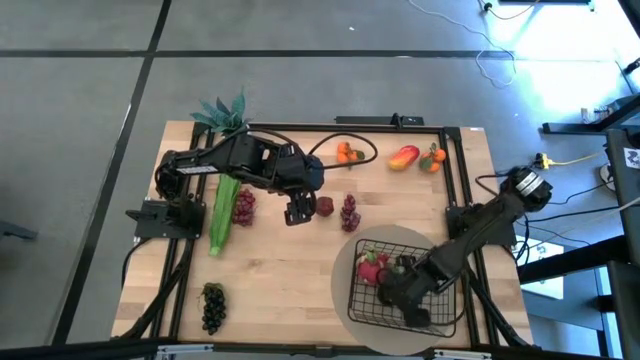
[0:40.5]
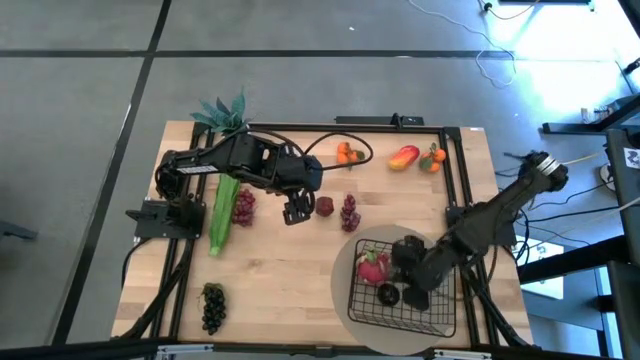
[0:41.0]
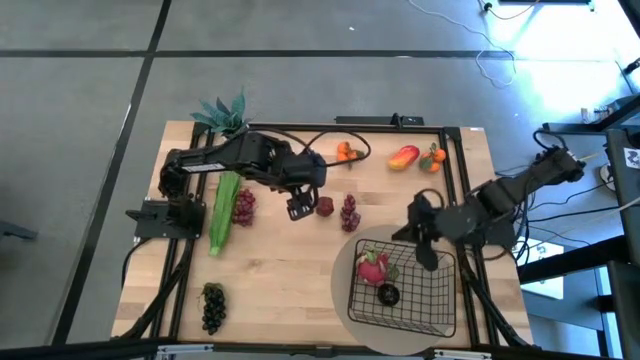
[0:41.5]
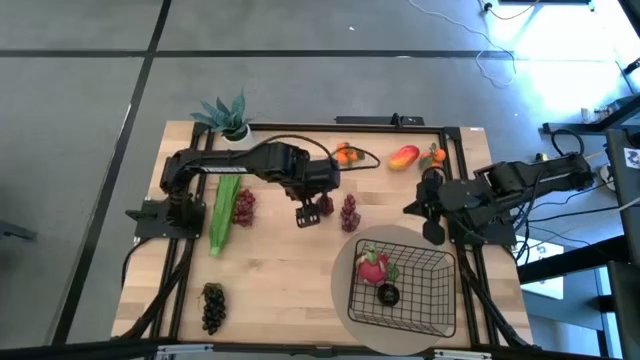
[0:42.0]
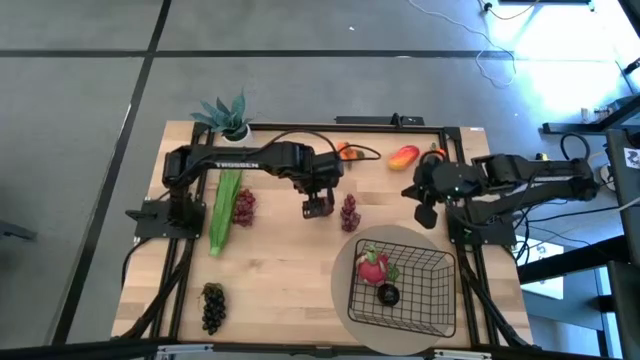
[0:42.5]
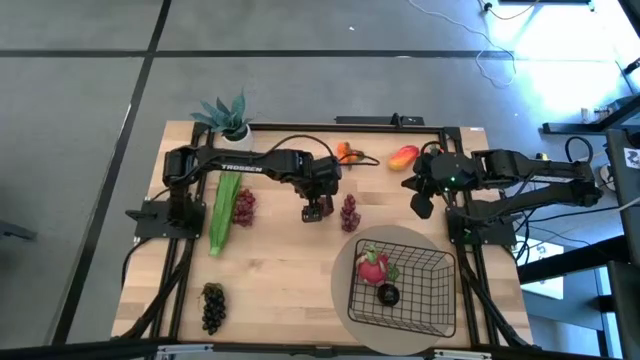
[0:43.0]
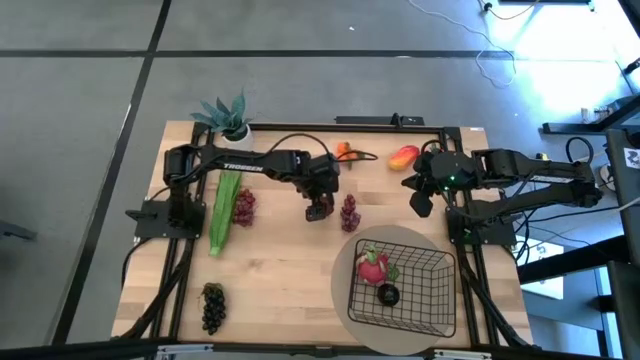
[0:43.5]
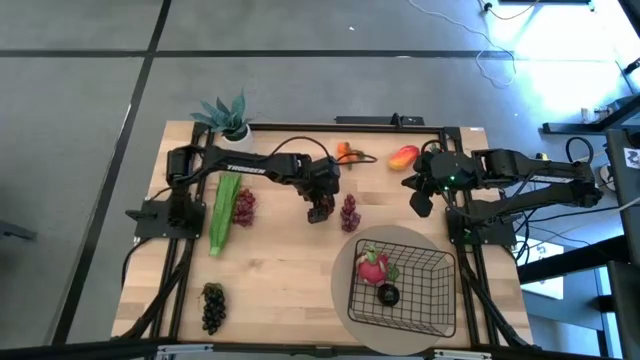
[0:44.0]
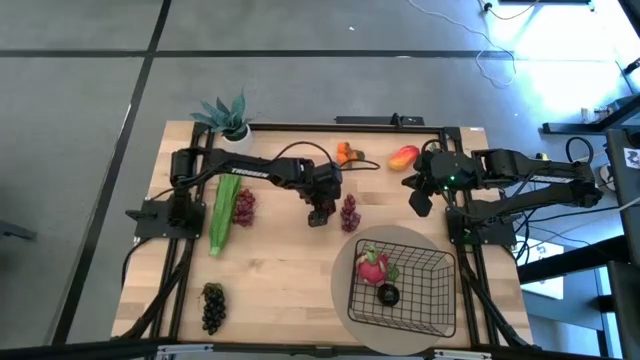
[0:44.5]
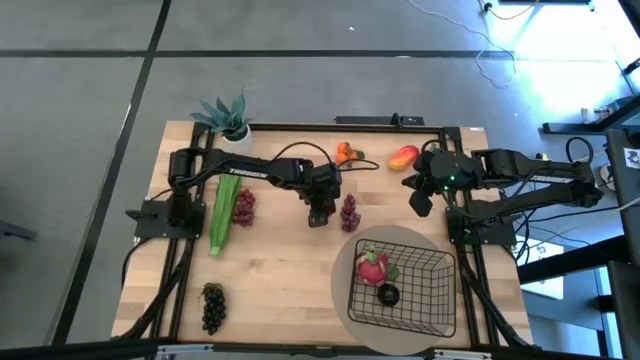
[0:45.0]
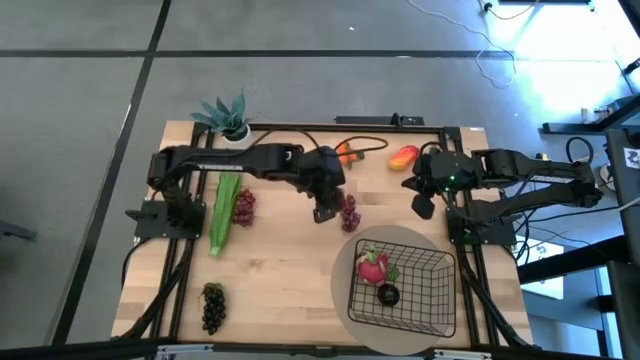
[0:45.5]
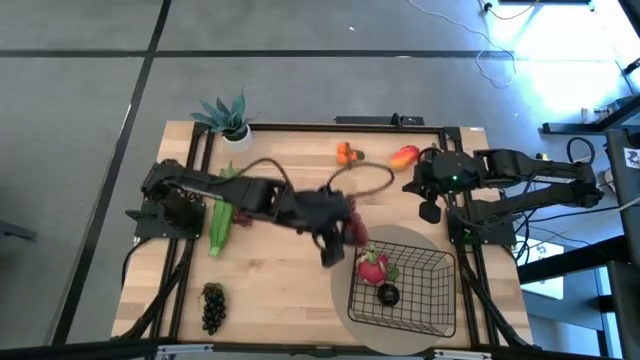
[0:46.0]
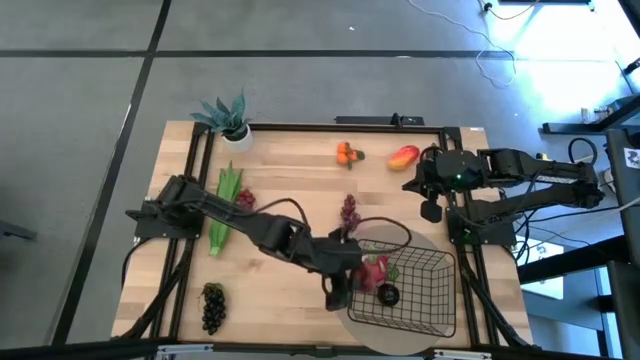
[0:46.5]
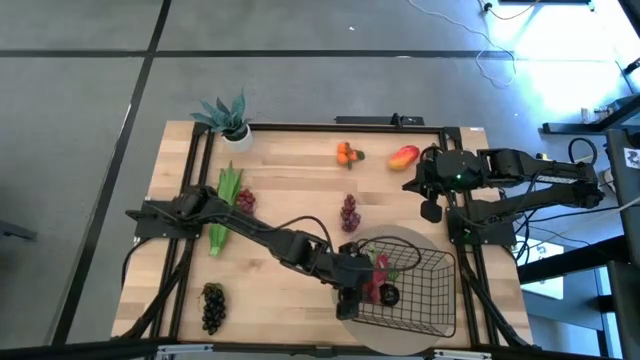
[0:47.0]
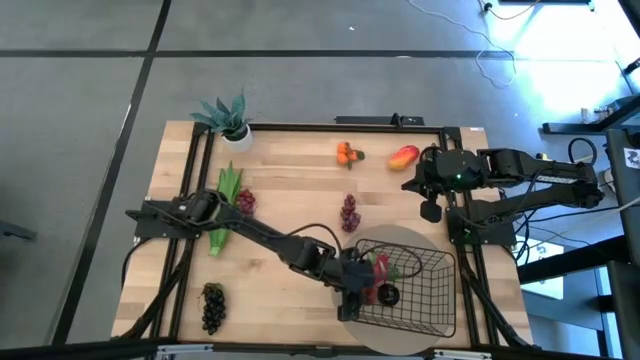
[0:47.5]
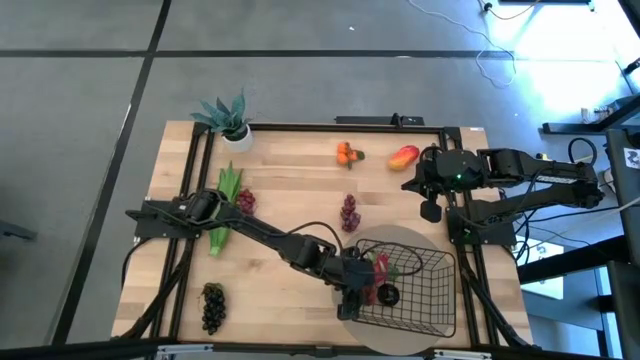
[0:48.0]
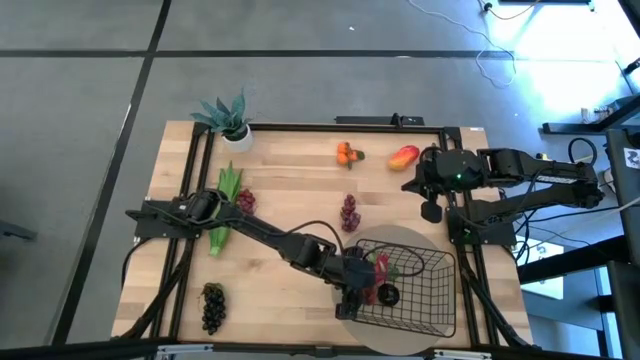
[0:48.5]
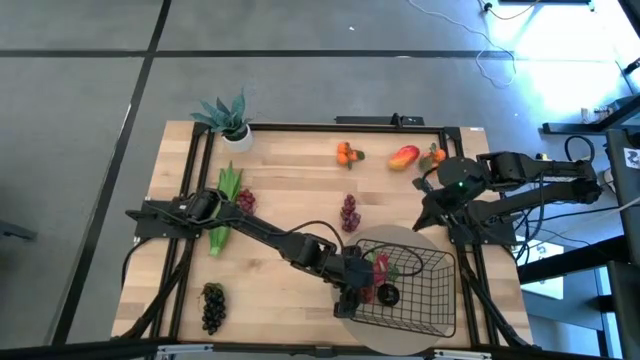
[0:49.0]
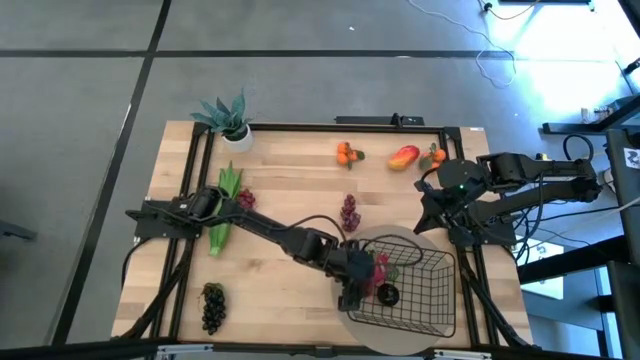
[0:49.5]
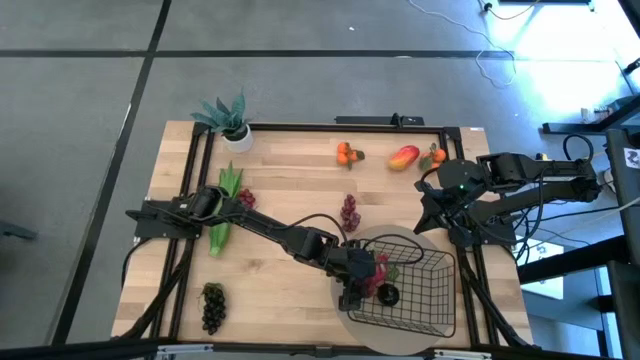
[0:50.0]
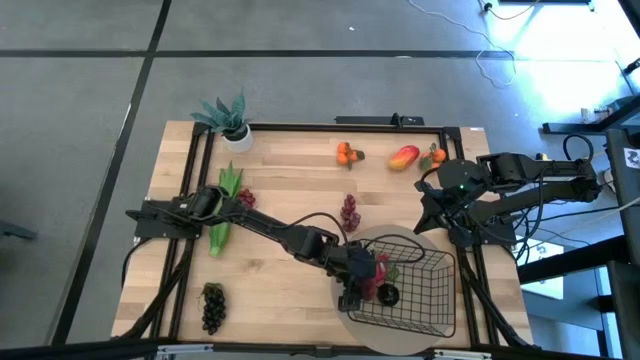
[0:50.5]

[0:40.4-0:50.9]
Task: Build produce basket
Put the red apple into the black wire basket

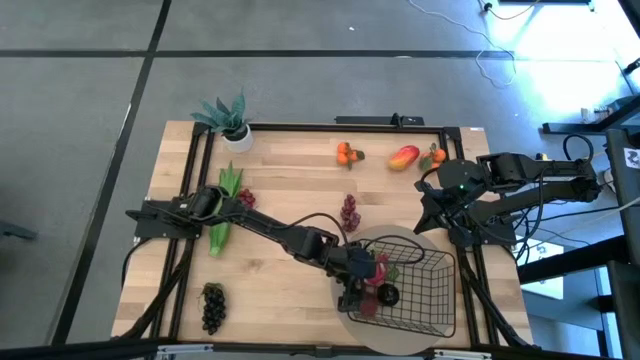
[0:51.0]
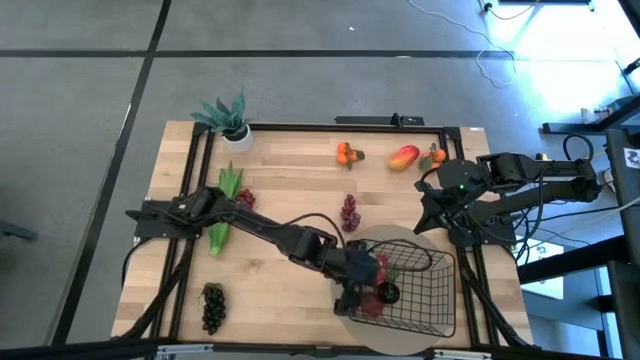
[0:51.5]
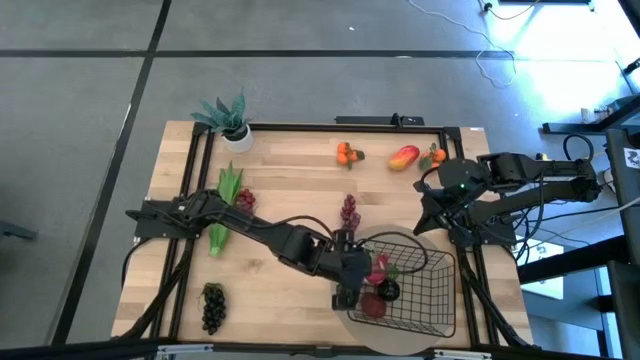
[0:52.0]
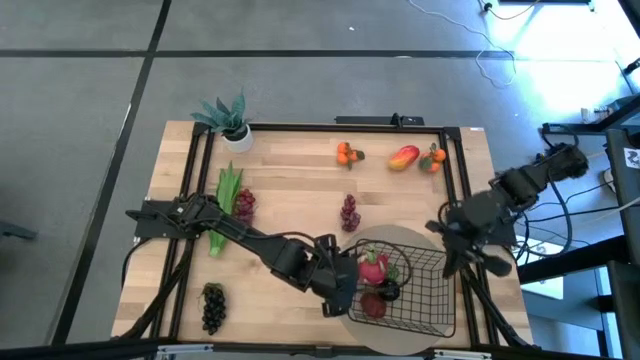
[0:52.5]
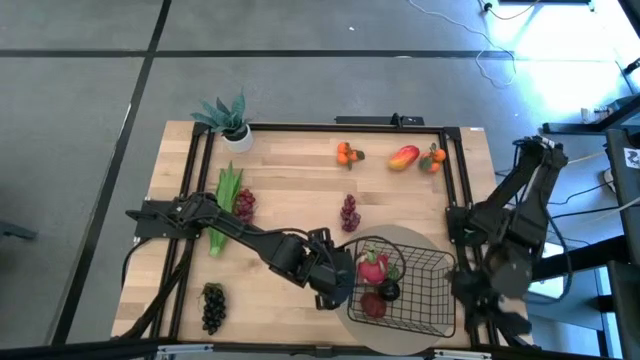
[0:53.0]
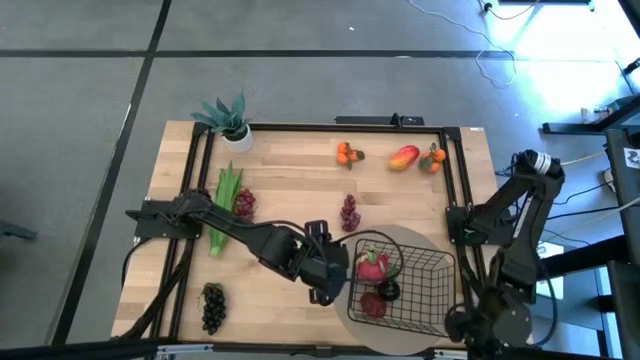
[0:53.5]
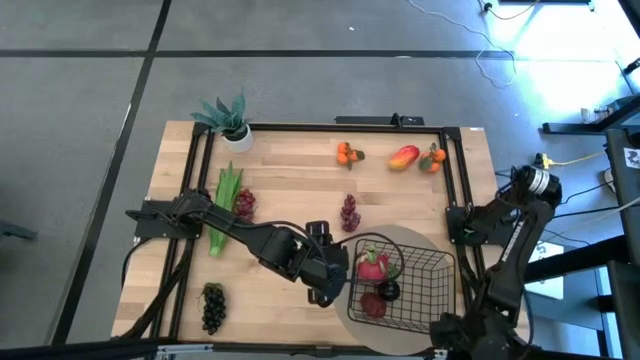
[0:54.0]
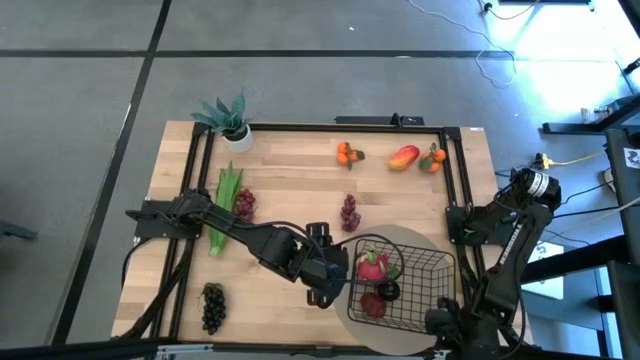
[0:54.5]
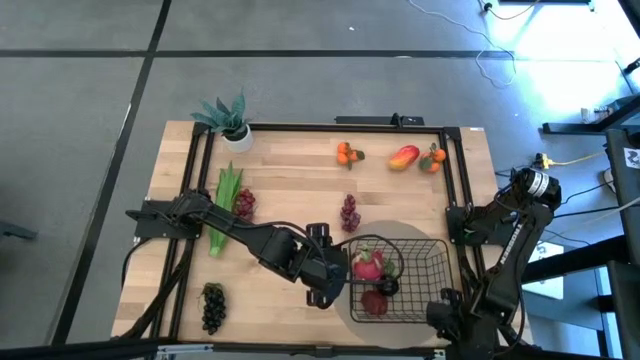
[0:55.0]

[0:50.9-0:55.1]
Adjust the black wire basket on the table

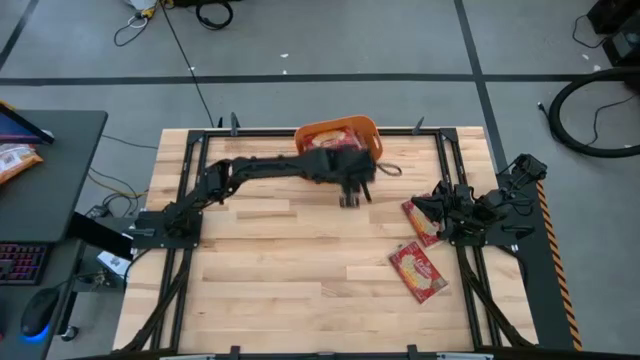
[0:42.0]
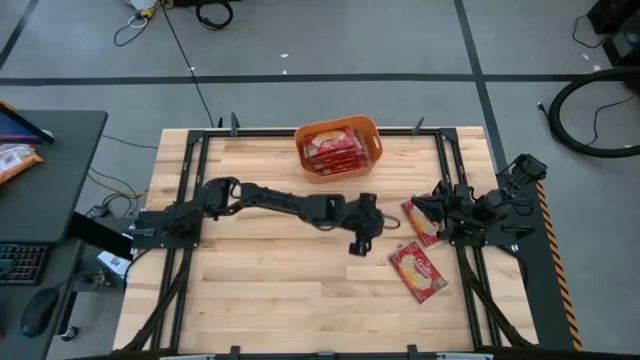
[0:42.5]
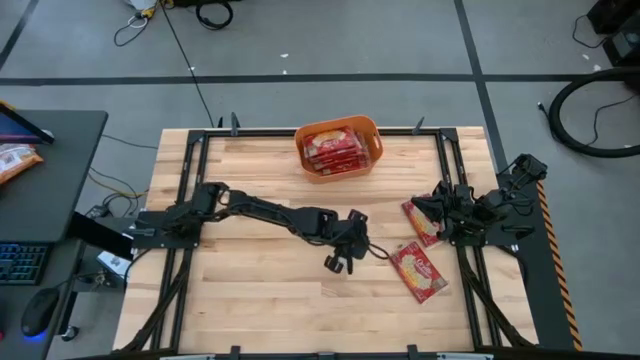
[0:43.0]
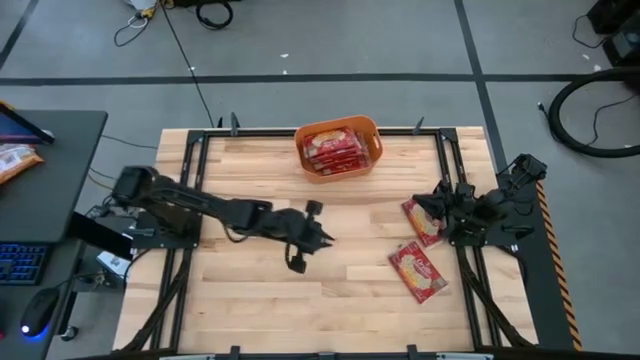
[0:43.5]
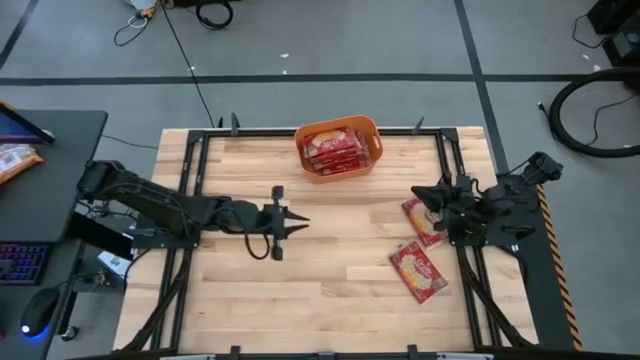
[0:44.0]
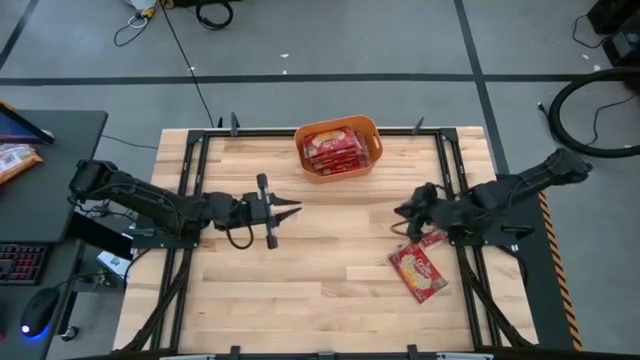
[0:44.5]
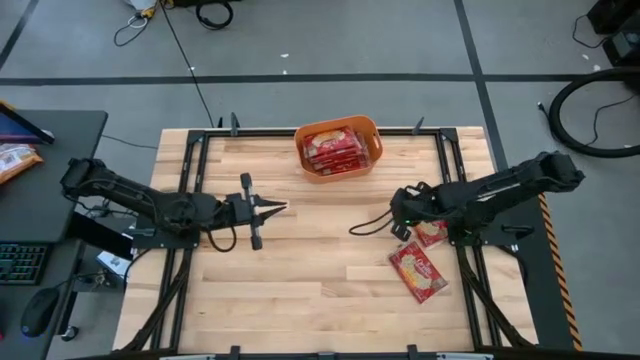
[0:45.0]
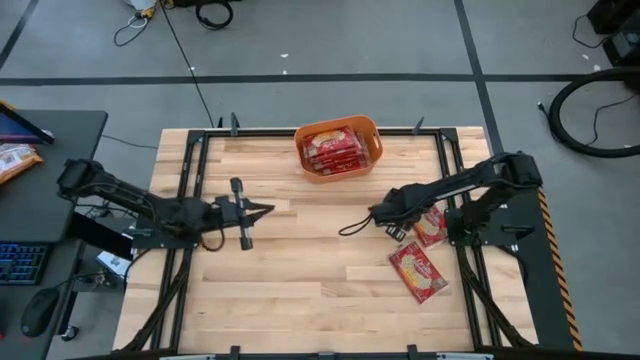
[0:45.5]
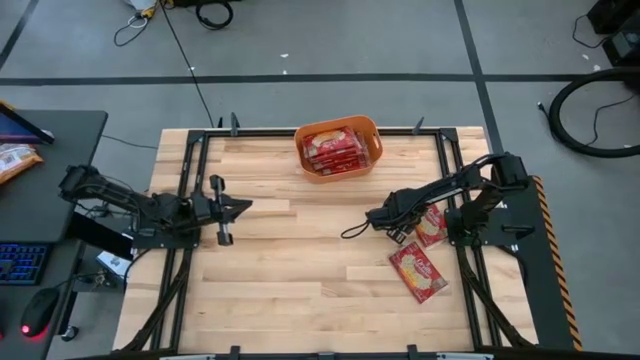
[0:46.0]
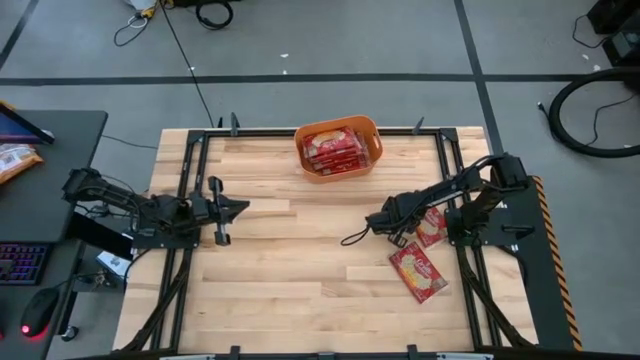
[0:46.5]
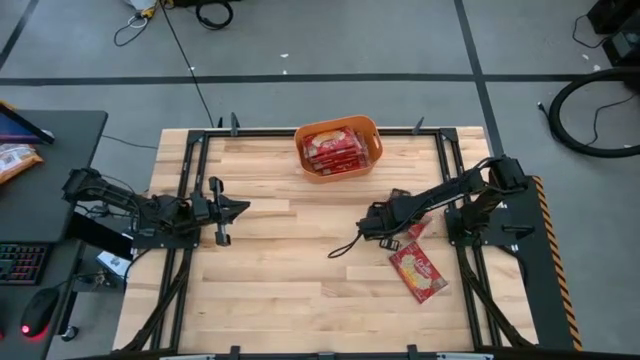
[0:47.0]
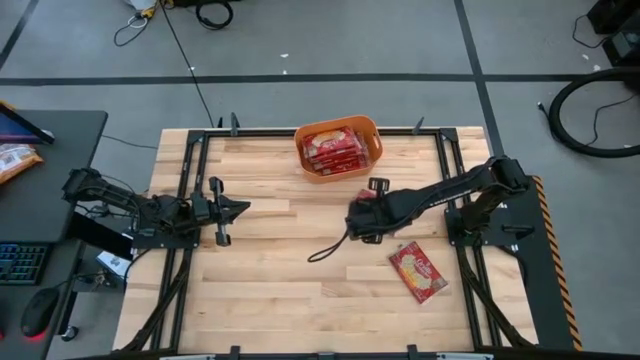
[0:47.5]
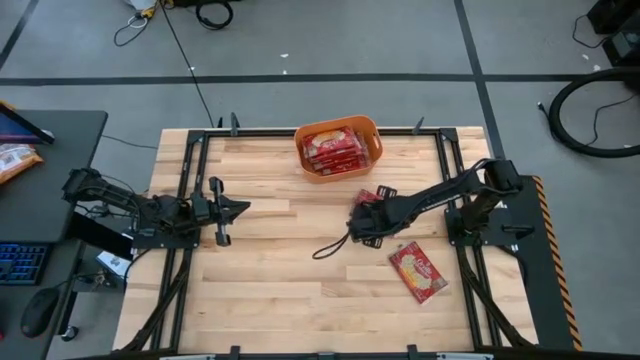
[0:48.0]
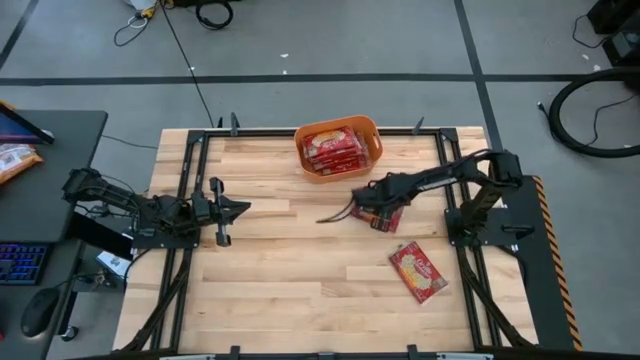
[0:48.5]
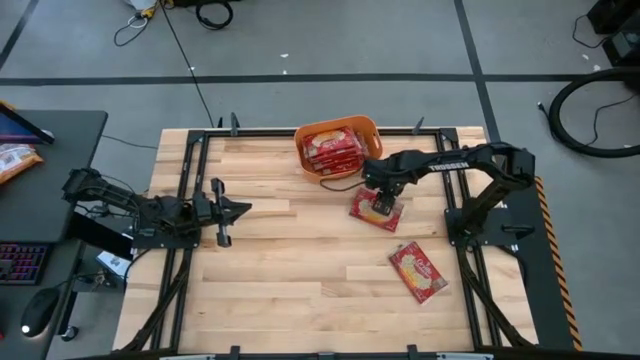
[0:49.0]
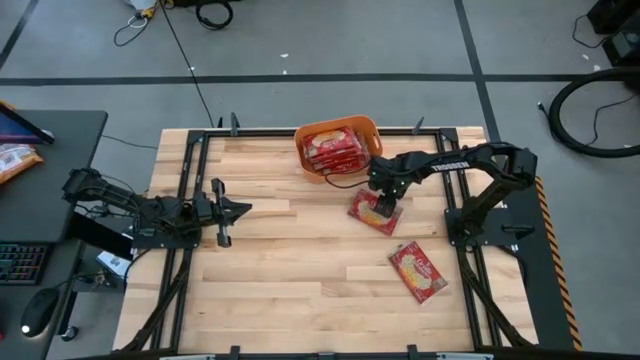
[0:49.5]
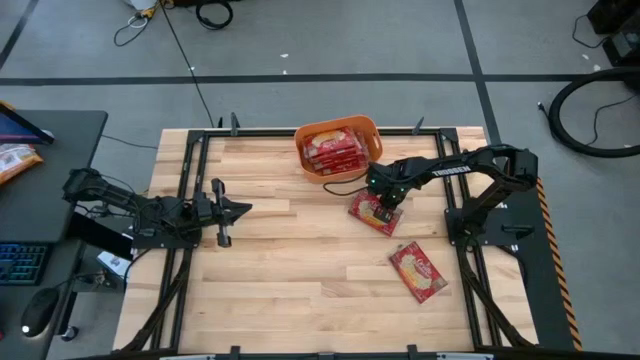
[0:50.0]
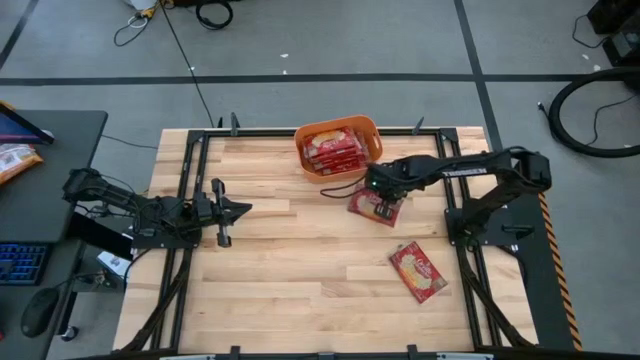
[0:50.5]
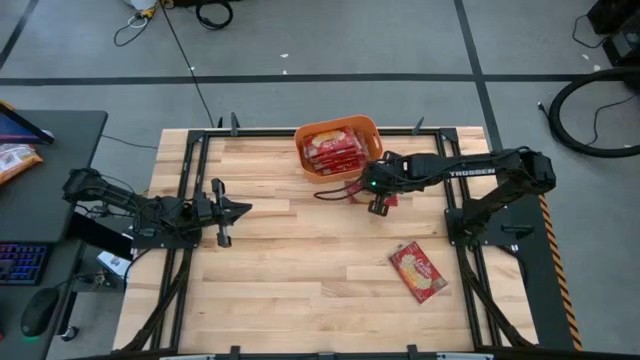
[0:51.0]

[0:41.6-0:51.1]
Task: Sort popcorn bags into baskets
Stack the popcorn bag on top of the stacked popcorn bag into the bin
